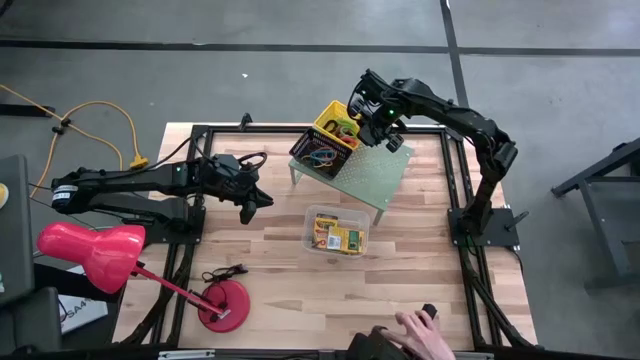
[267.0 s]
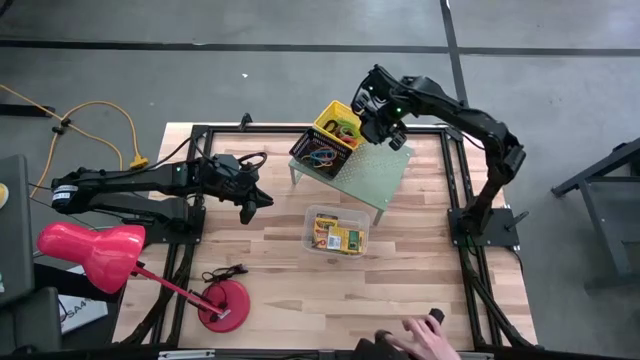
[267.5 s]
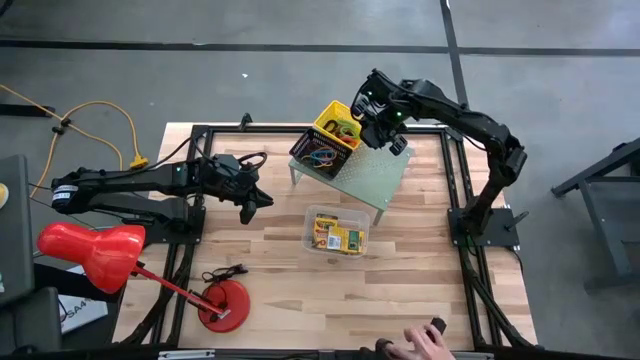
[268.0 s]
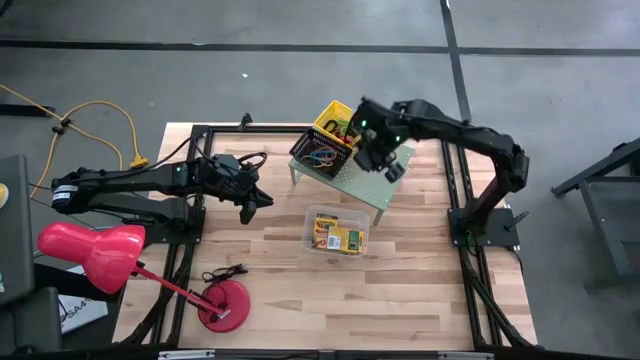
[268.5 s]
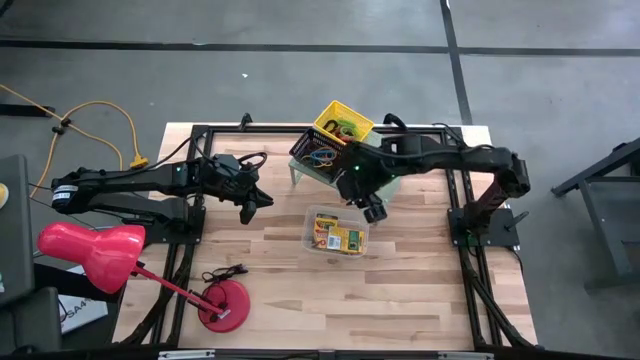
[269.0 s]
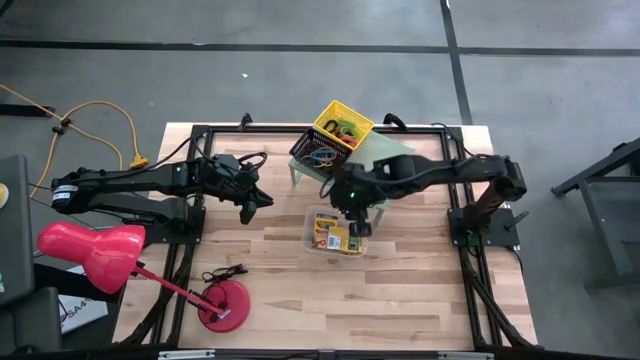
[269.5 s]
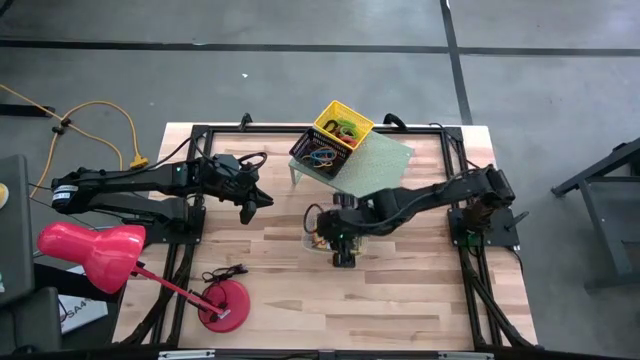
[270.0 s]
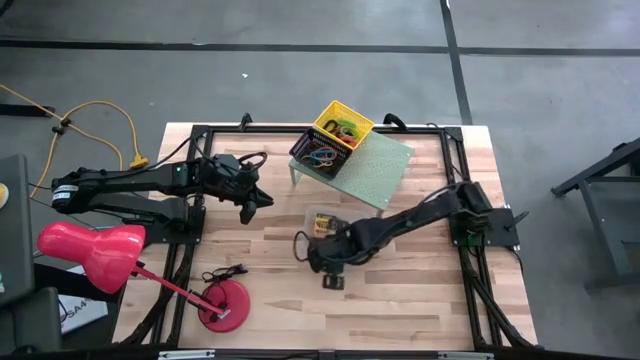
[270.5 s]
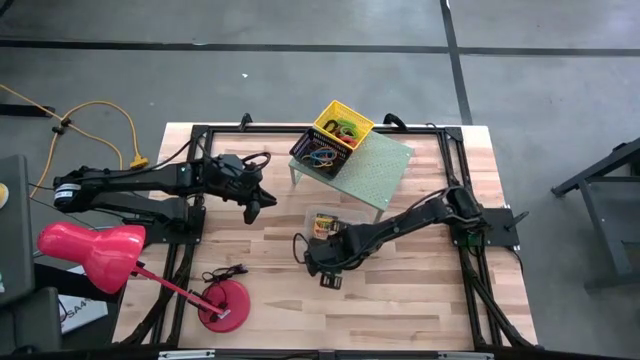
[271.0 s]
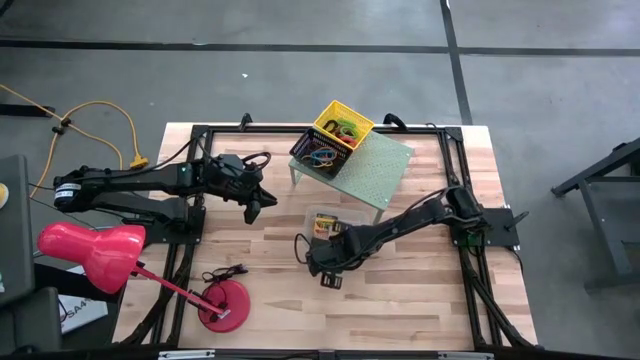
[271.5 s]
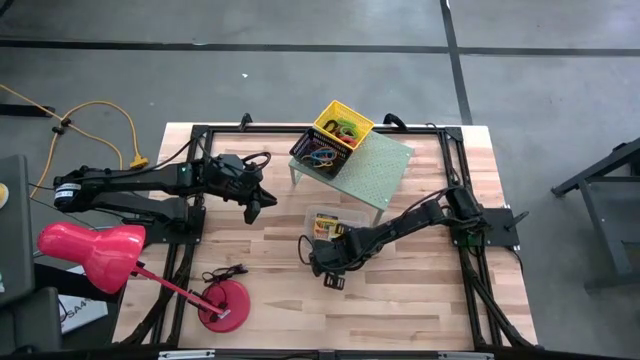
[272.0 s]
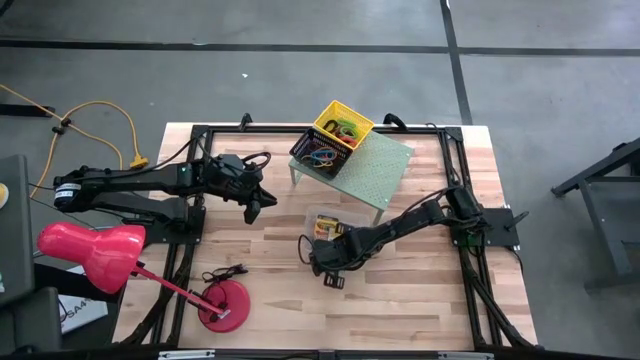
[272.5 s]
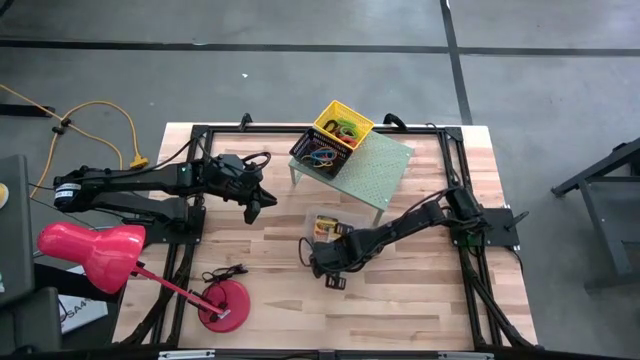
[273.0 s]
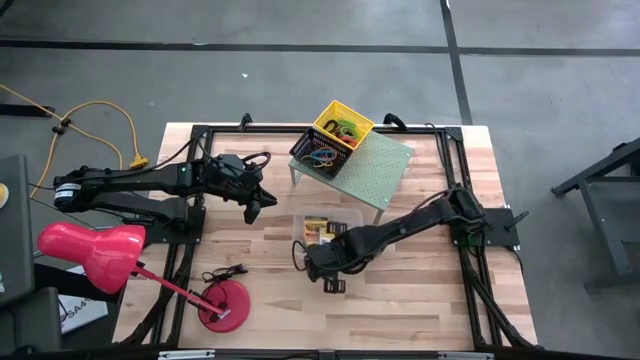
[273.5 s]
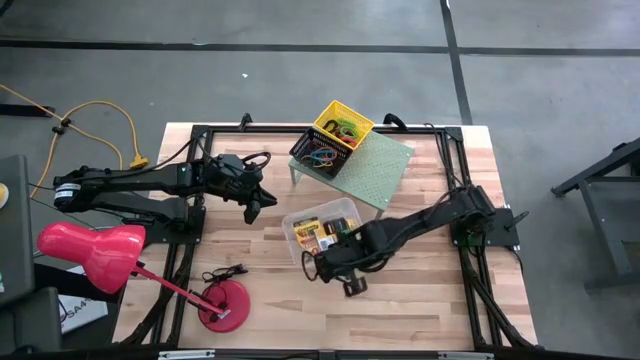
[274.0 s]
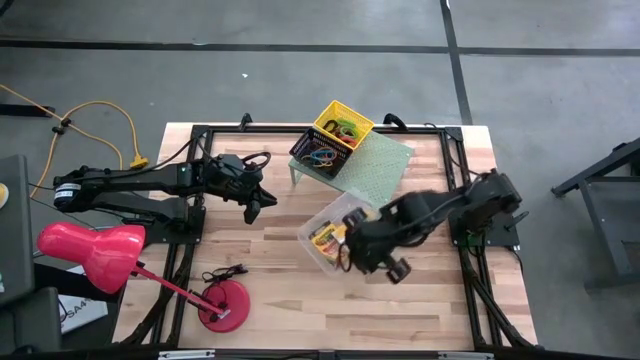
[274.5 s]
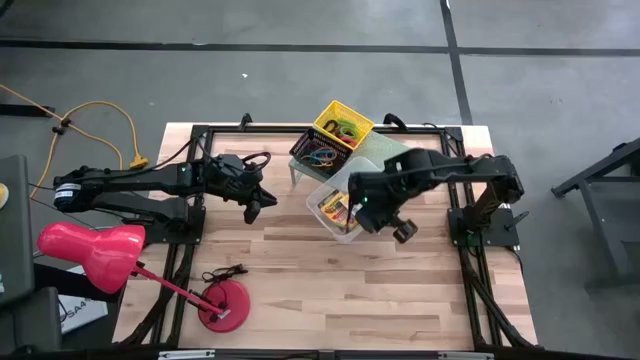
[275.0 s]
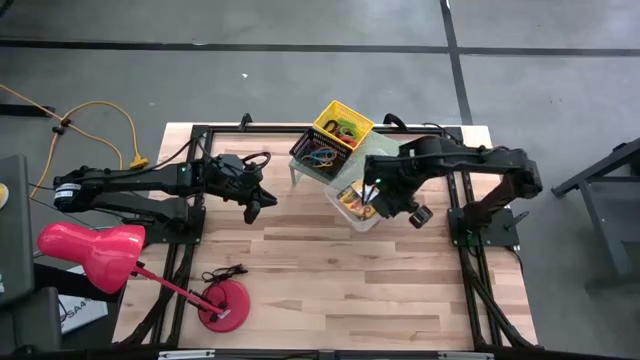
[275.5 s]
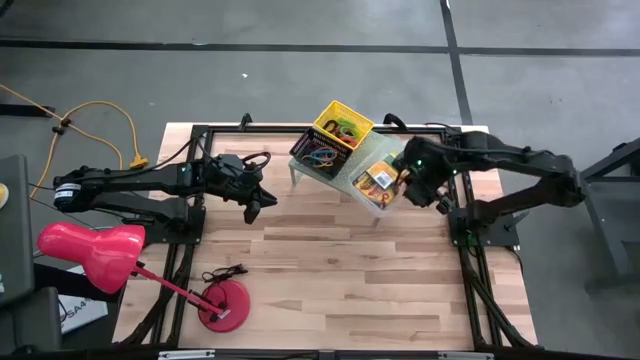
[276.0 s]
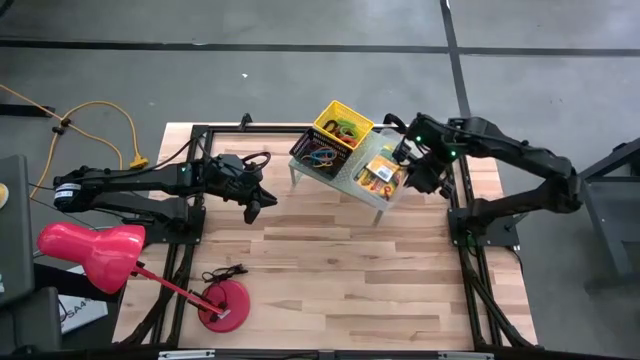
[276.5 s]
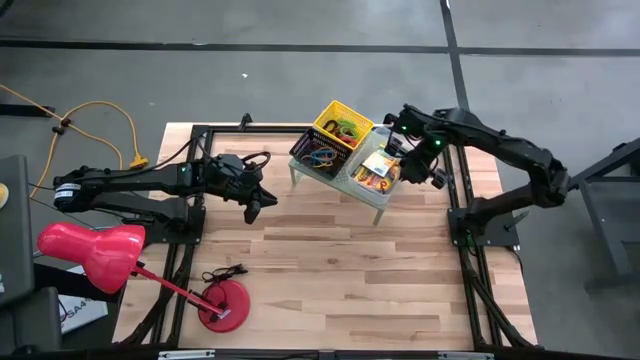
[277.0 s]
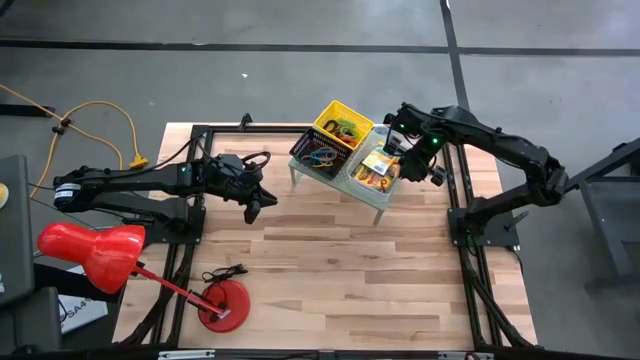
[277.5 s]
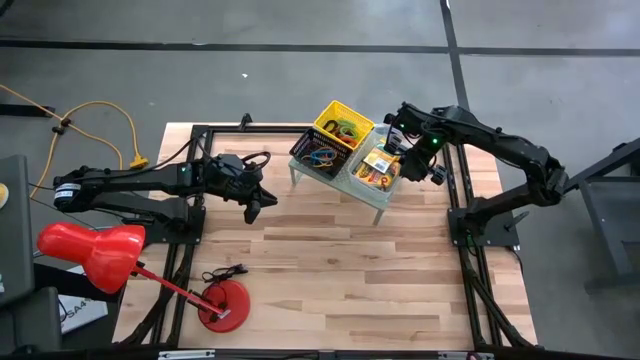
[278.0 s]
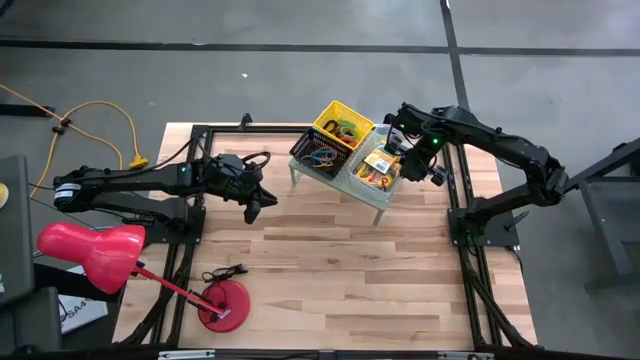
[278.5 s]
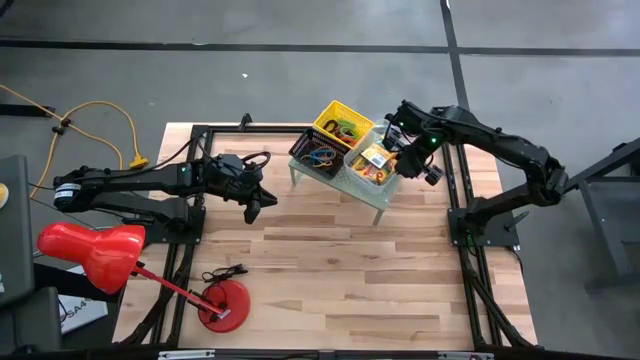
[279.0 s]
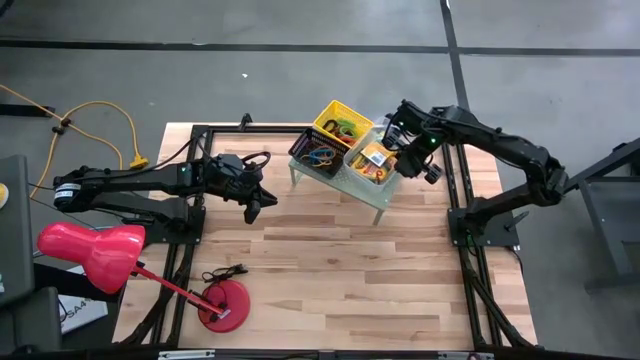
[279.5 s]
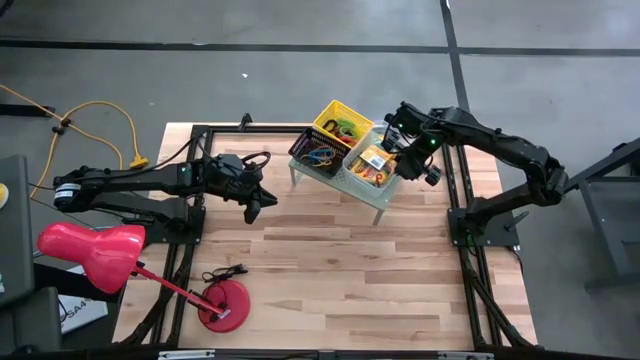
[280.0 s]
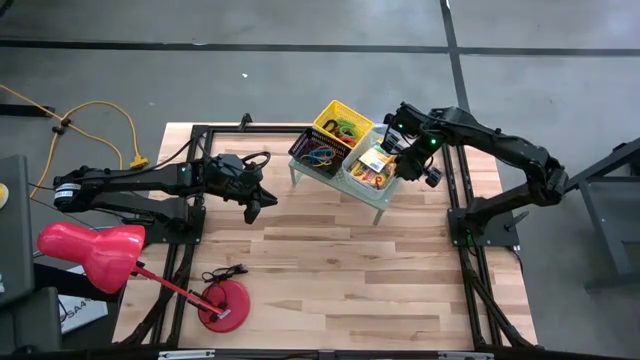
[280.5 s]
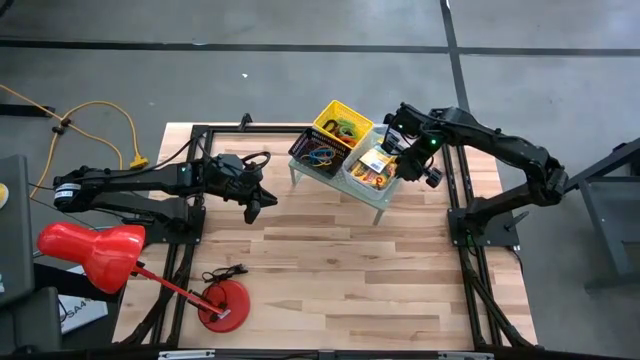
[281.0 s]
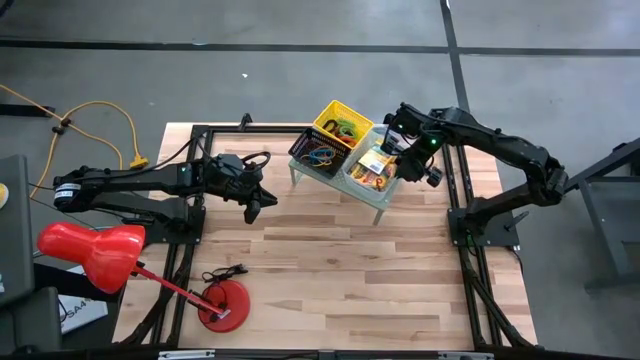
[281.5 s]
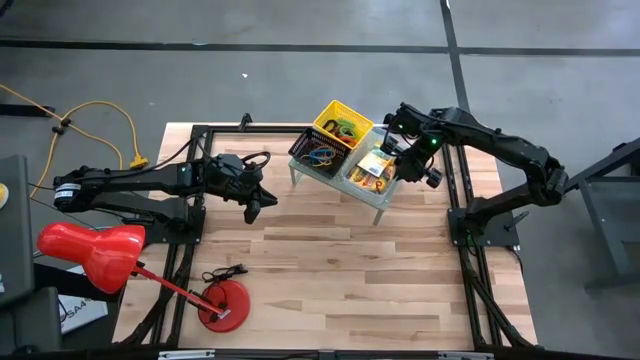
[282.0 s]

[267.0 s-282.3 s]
Task: Pick & Place Office Desk Supplies
Put the transparent bin with crayon boxes on the shelf

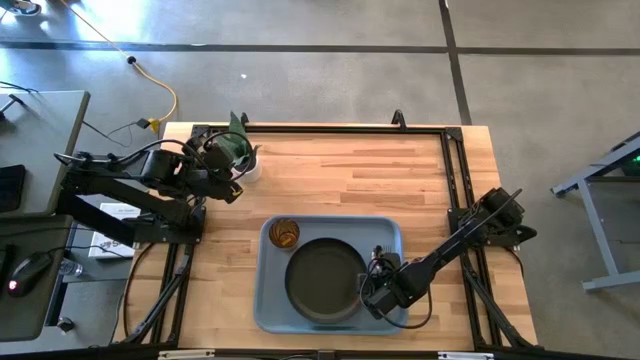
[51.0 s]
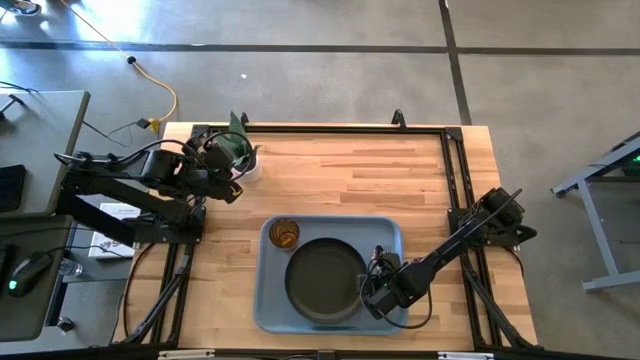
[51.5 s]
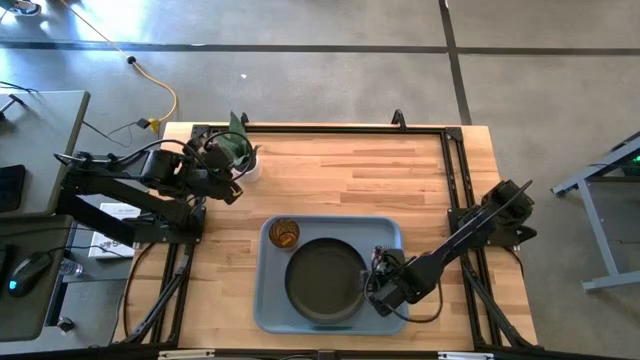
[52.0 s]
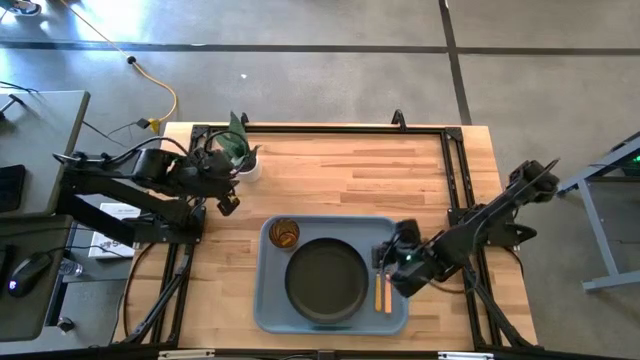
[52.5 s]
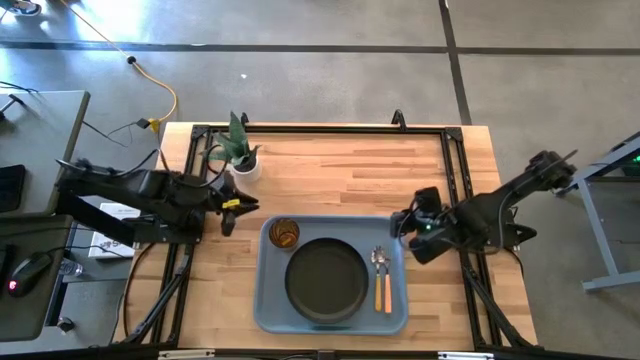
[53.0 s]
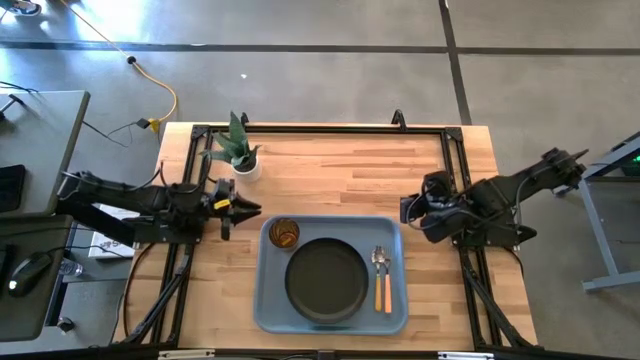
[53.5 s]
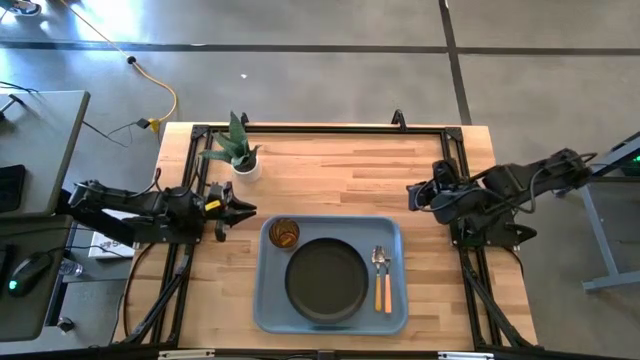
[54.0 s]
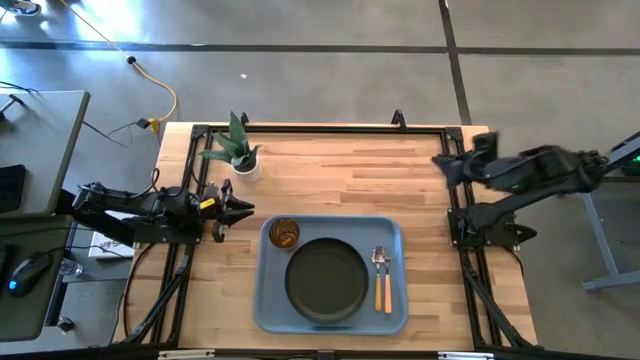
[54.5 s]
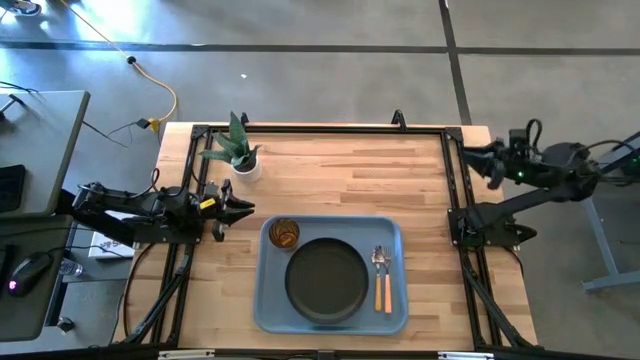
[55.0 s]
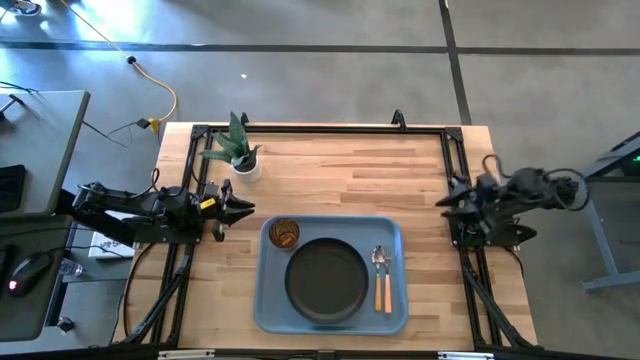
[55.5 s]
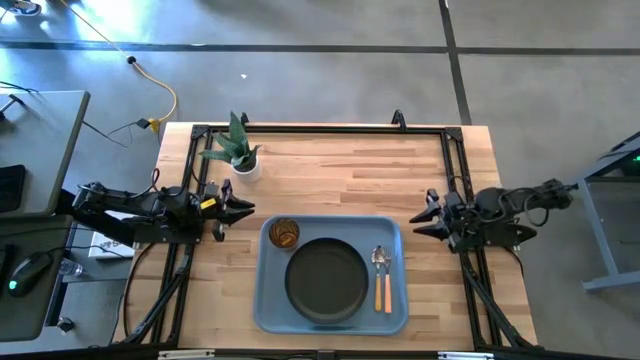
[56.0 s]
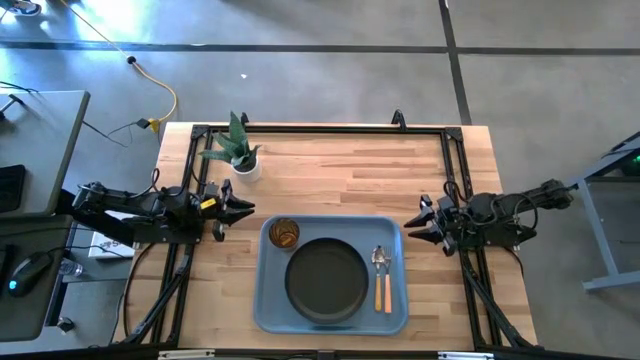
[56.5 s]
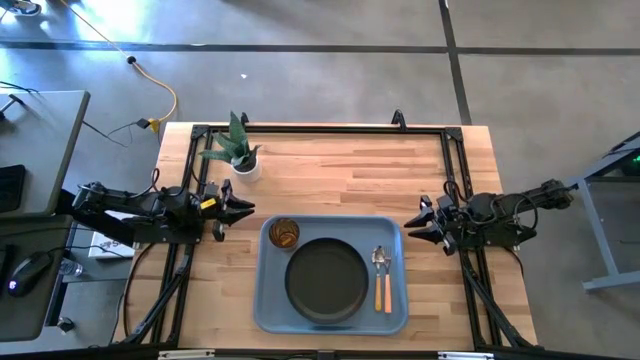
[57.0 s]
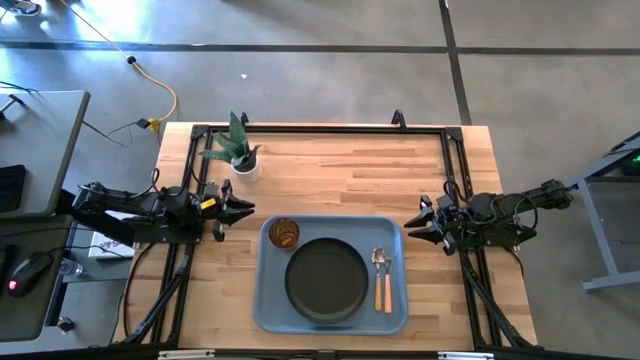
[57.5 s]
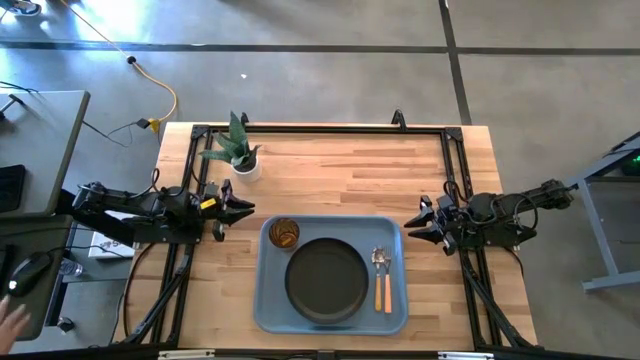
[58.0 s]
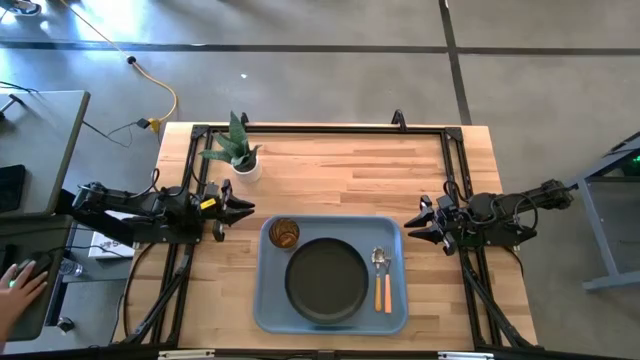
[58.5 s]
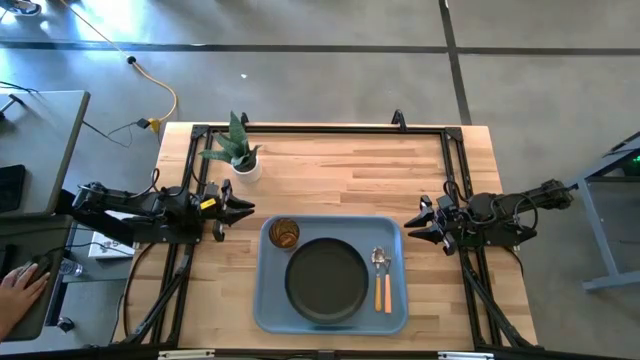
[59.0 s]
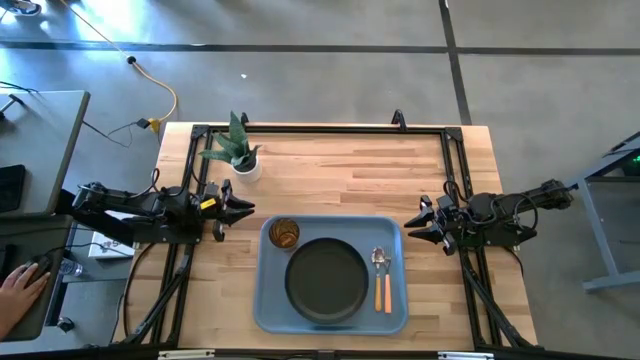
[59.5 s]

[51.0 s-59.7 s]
Task: Pick and place plate/cup/fork/spoon on tray
Return to Home Position
